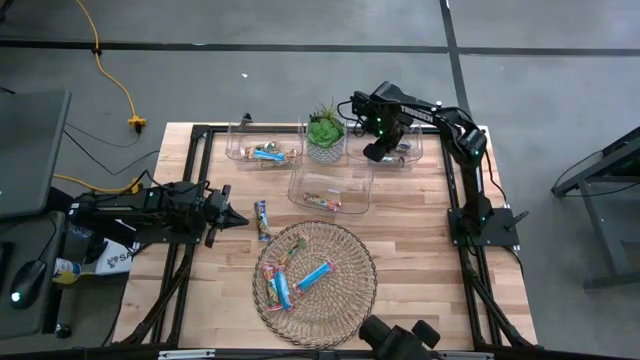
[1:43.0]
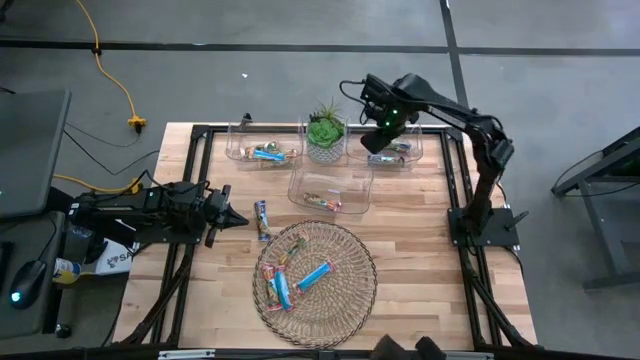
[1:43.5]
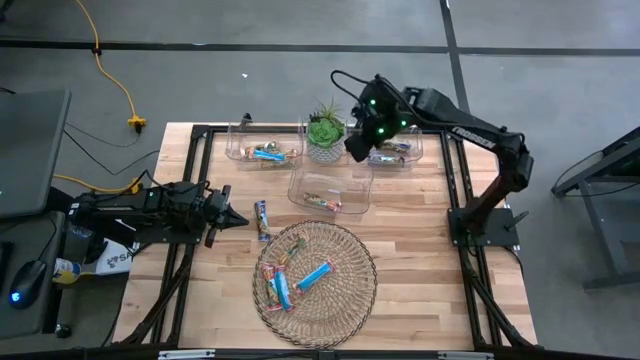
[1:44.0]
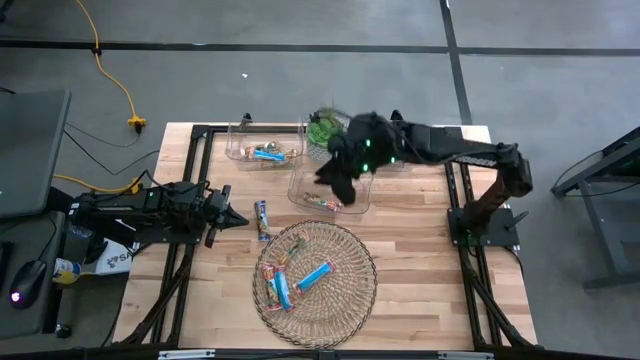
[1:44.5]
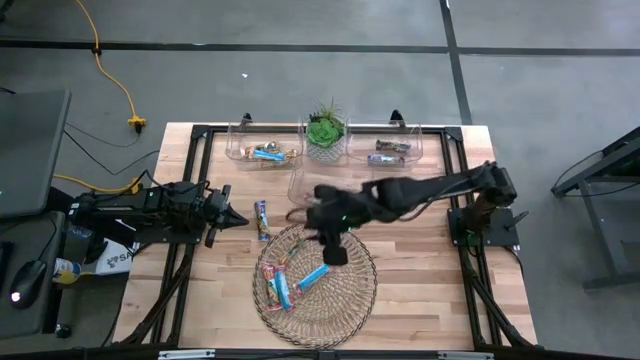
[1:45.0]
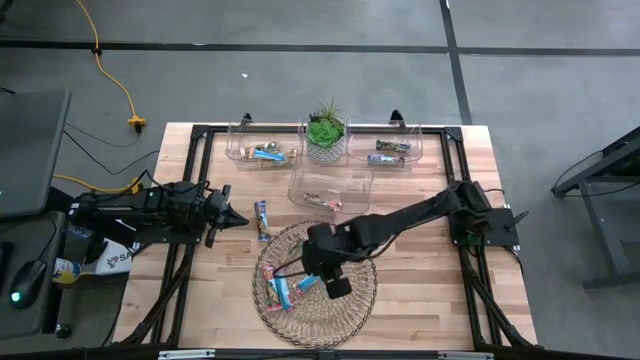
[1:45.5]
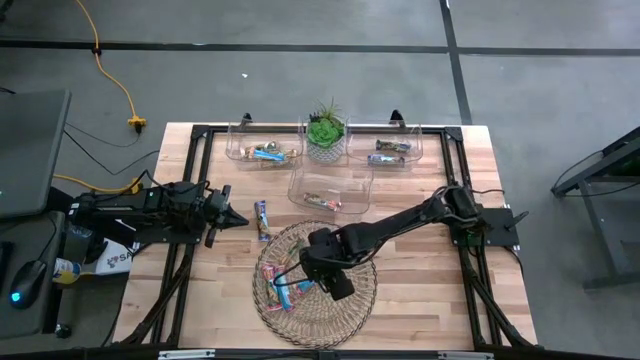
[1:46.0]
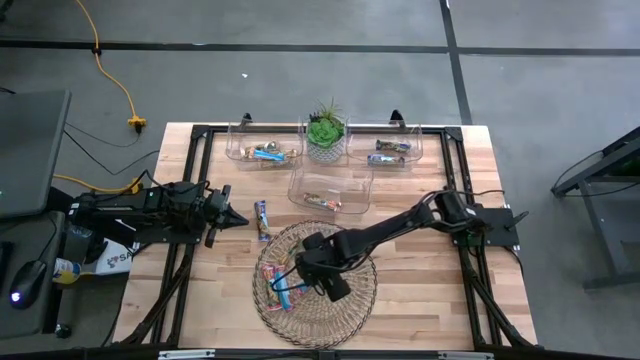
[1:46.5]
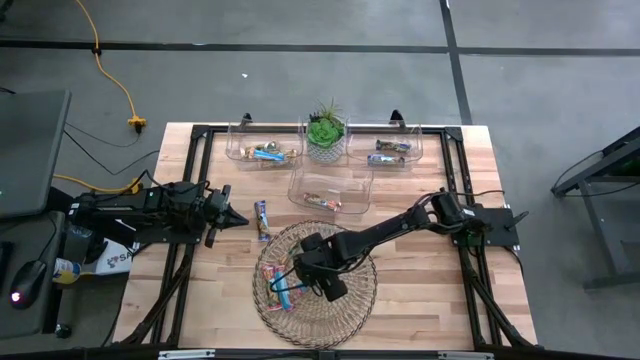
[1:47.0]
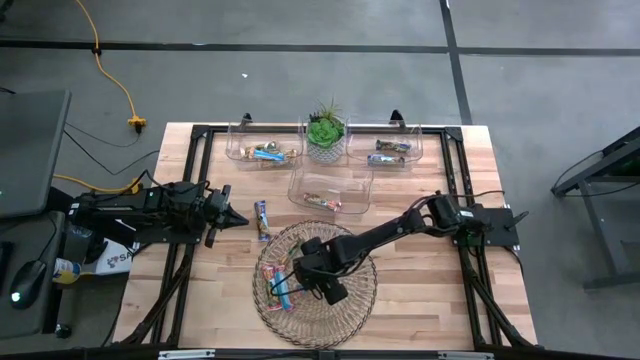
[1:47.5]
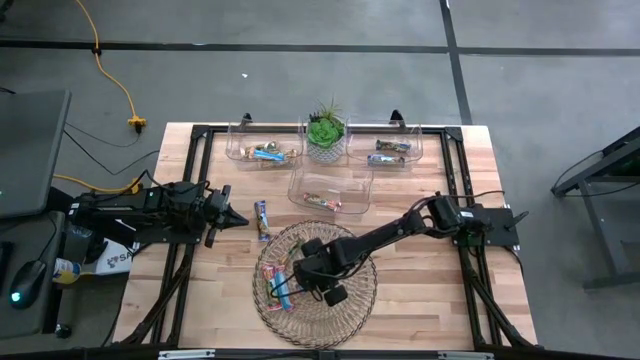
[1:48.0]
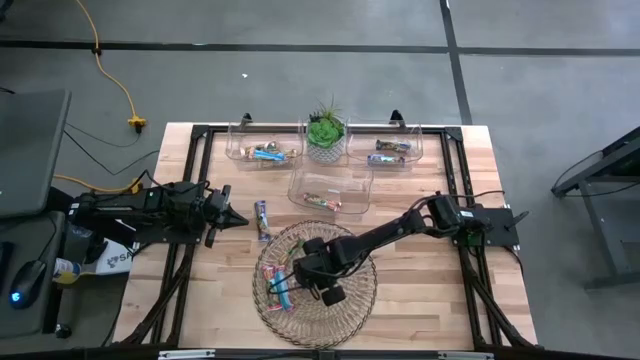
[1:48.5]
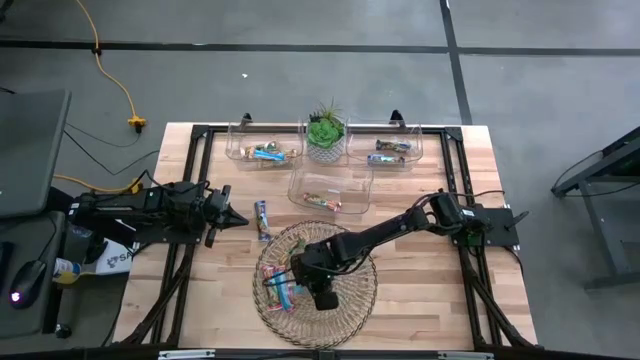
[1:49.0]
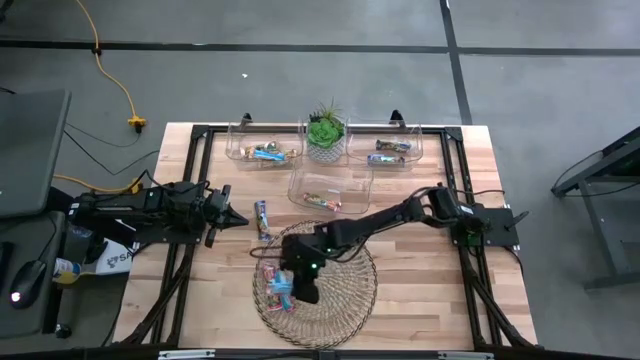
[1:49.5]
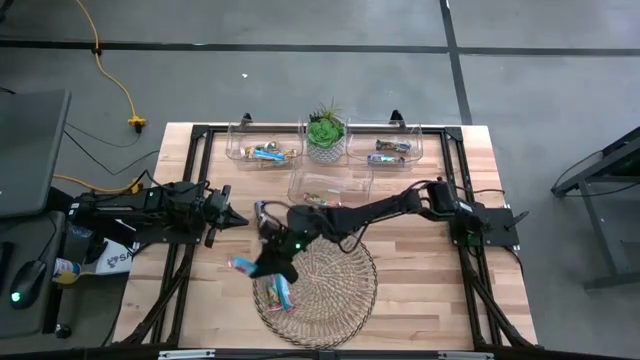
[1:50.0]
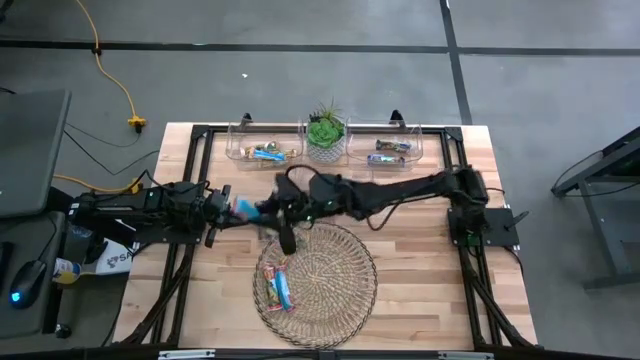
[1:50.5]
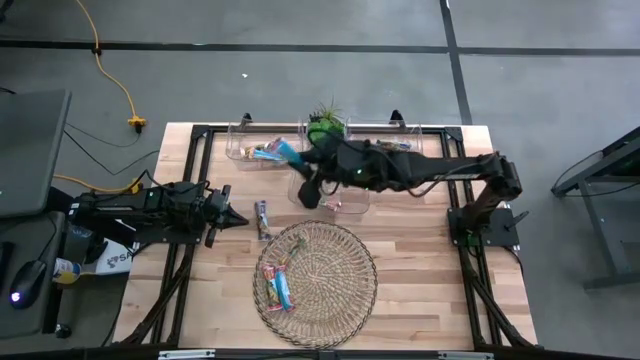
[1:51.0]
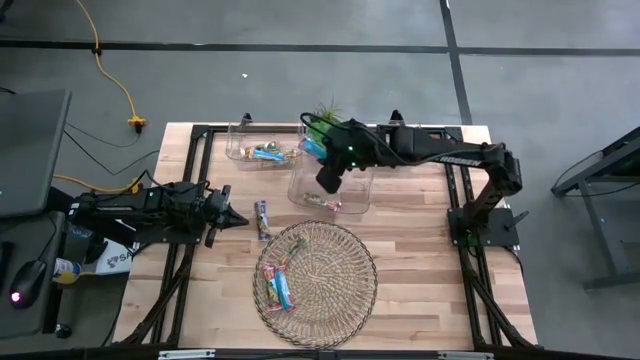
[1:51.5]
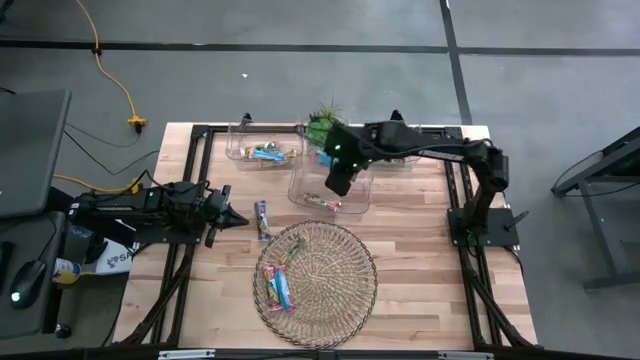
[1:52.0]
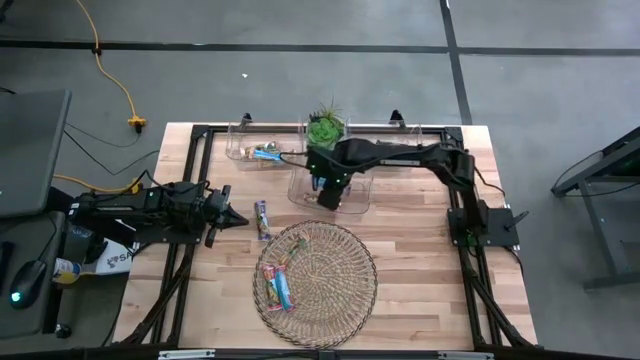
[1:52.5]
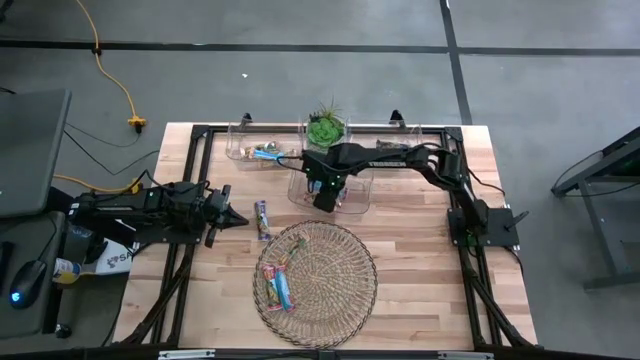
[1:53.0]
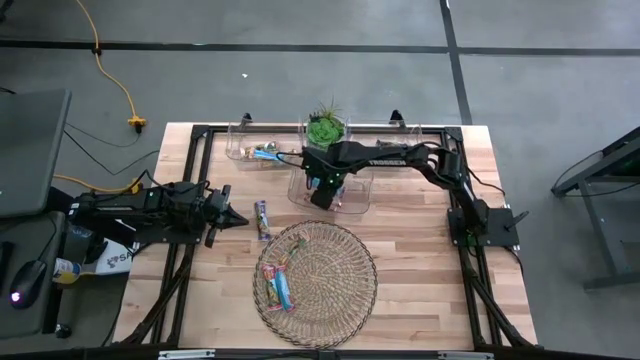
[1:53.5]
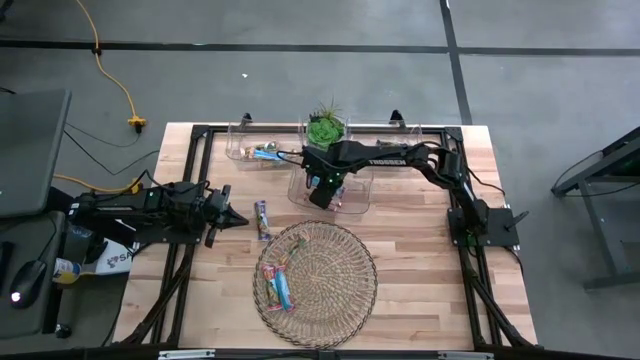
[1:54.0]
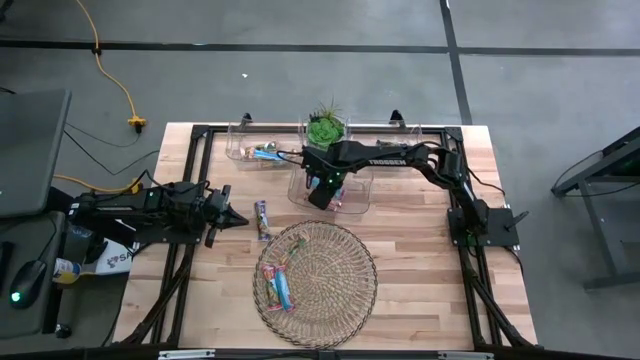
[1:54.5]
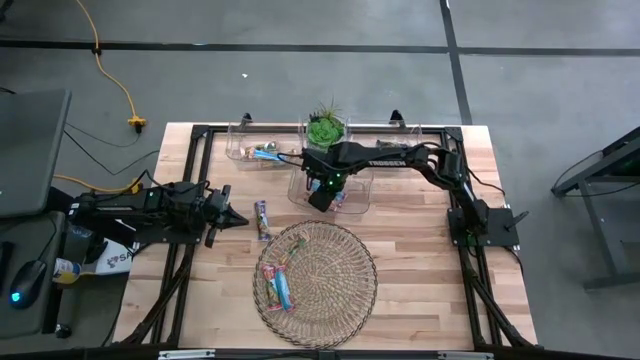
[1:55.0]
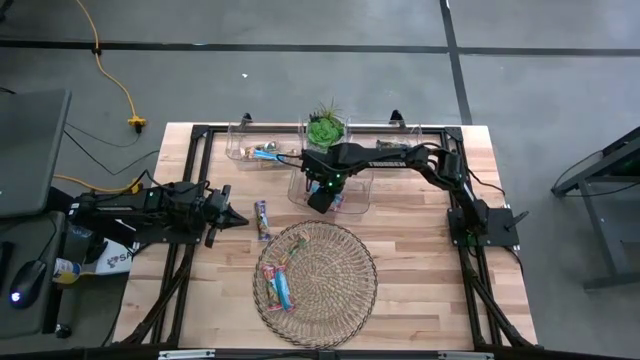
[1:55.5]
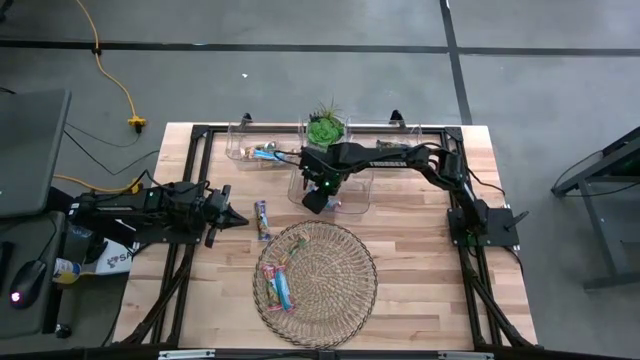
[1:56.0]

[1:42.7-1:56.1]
Task: Pick and place Granola Bars by type
Put the red granola bar into the bottom transparent bin

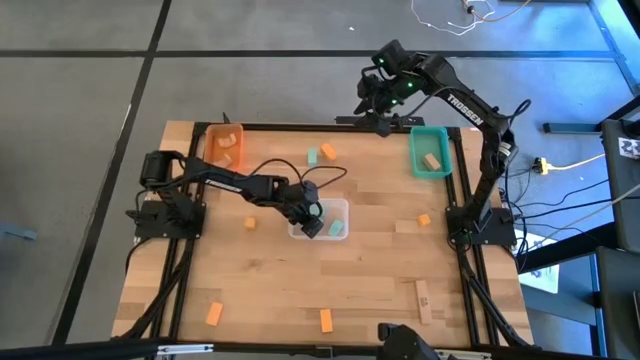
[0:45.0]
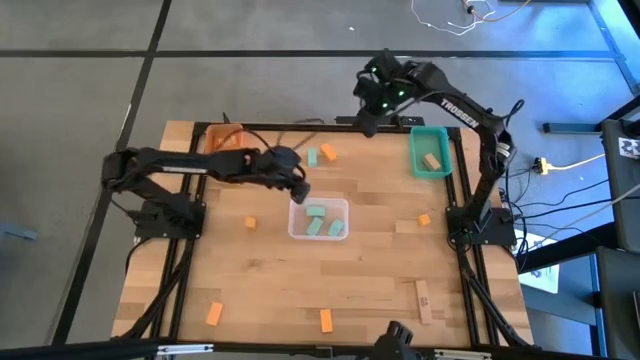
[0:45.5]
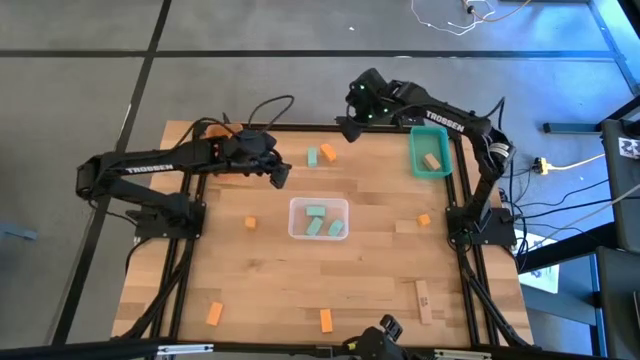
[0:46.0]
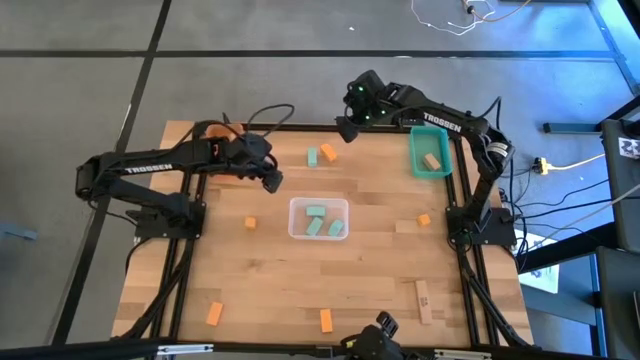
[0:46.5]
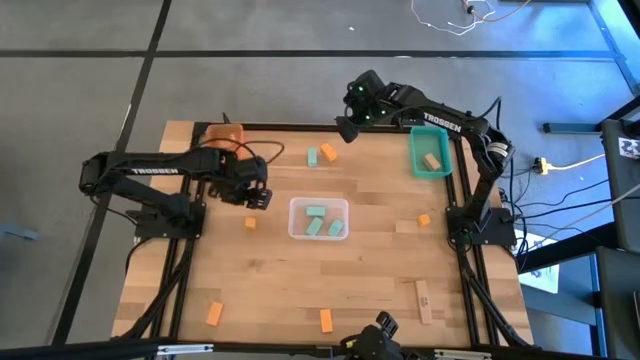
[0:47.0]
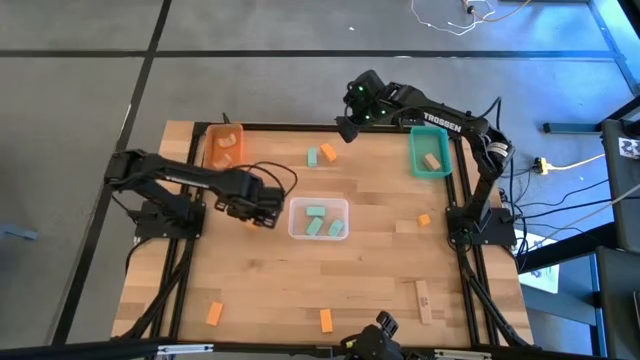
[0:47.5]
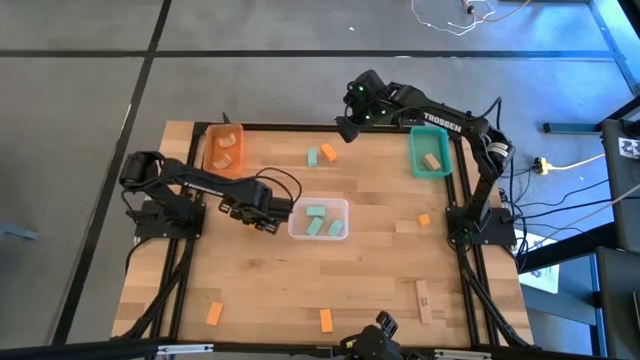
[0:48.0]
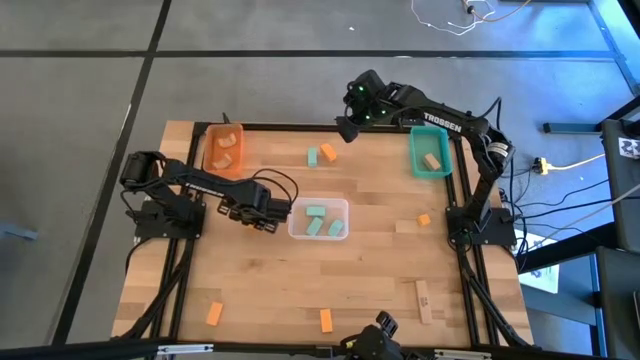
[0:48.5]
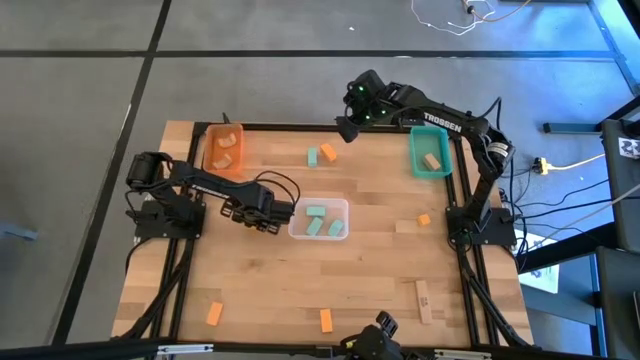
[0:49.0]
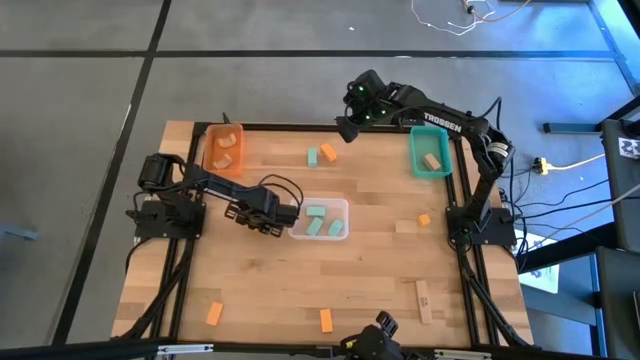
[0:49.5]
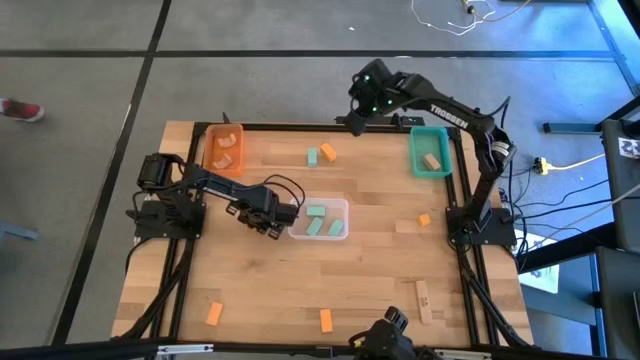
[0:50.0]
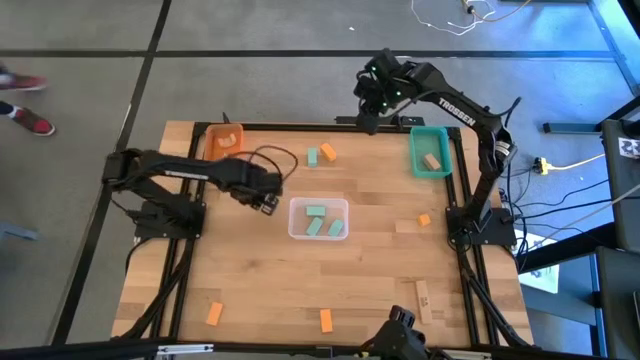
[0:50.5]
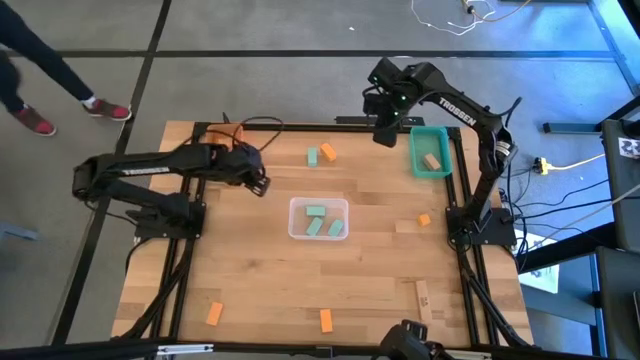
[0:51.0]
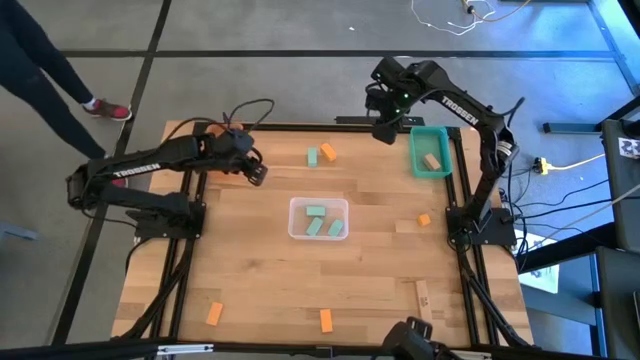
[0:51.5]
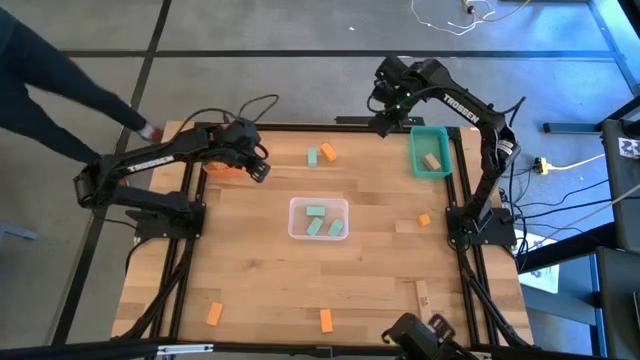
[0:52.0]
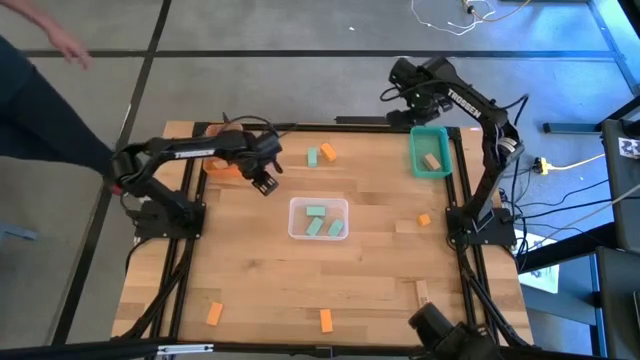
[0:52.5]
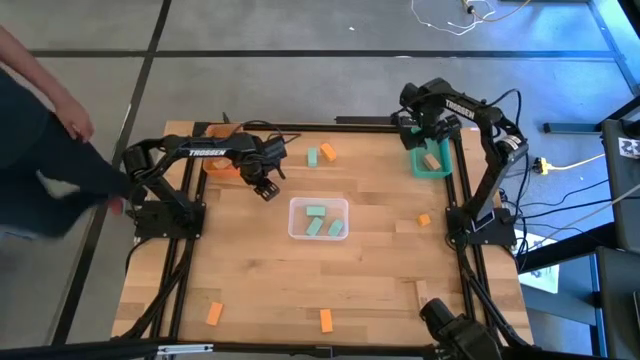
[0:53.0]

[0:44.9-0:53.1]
Task: Sort & place blocks by color
Move the yellow block near the bottom right of the orange bin
